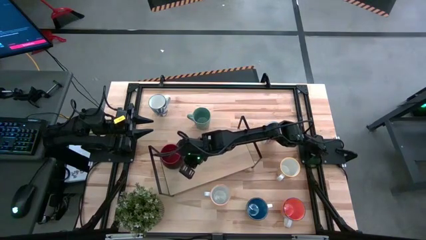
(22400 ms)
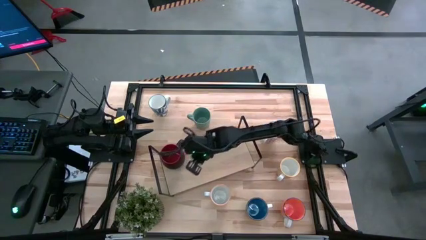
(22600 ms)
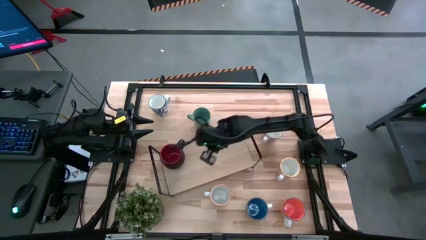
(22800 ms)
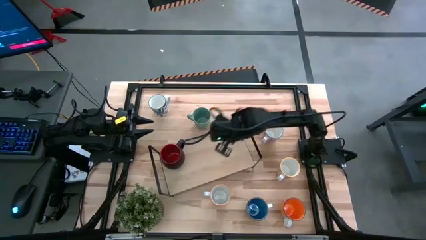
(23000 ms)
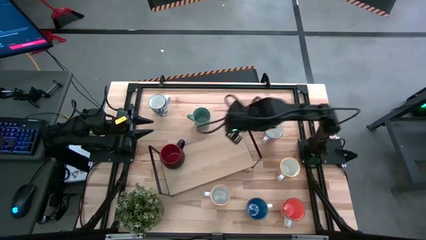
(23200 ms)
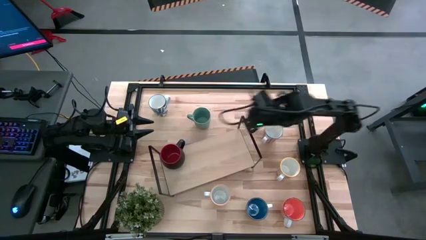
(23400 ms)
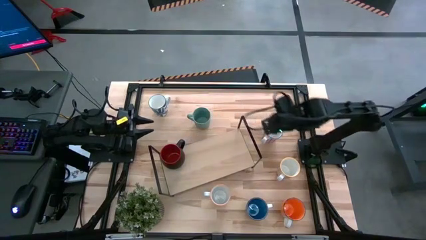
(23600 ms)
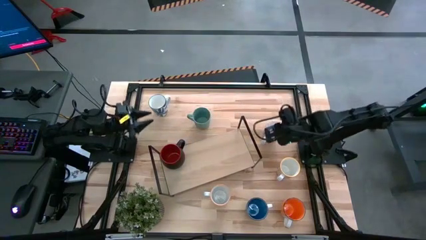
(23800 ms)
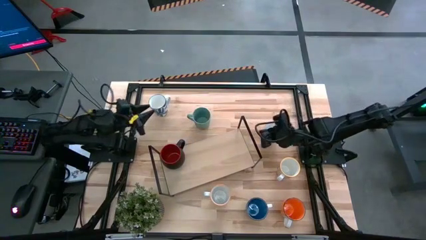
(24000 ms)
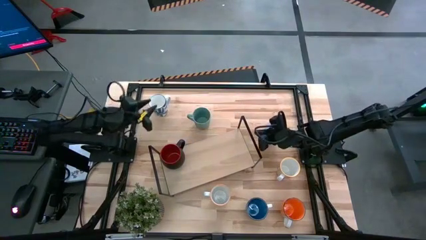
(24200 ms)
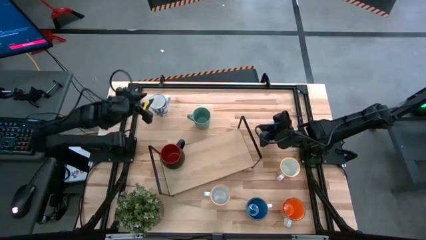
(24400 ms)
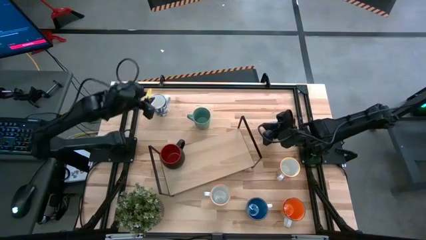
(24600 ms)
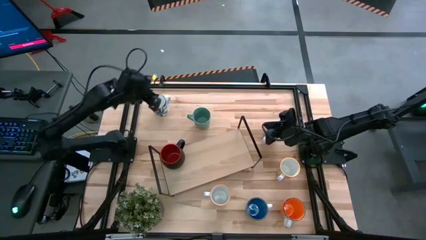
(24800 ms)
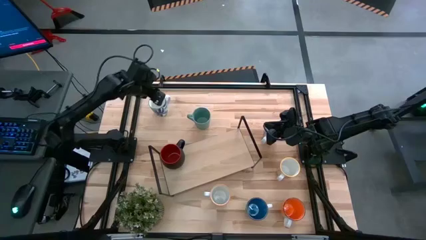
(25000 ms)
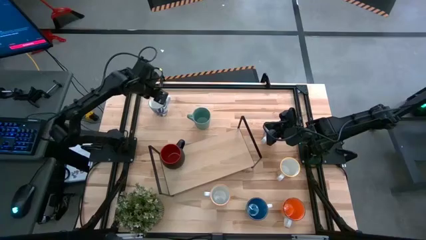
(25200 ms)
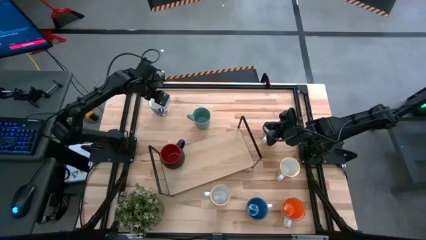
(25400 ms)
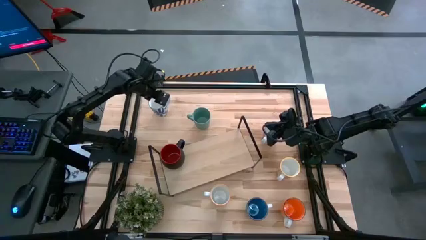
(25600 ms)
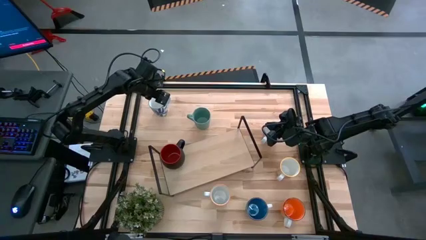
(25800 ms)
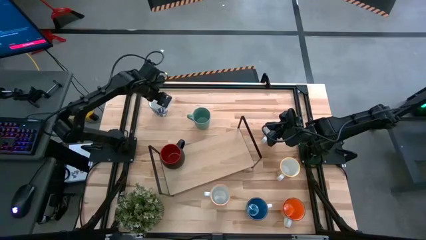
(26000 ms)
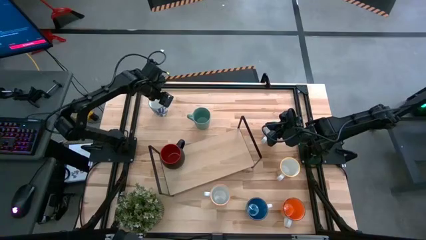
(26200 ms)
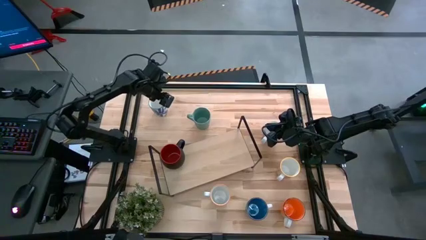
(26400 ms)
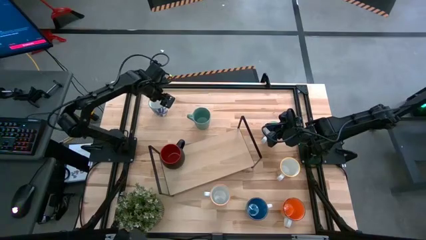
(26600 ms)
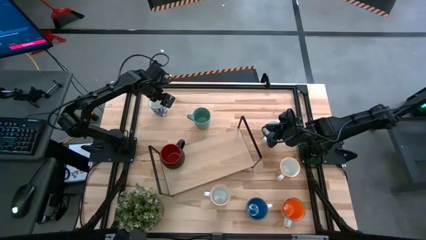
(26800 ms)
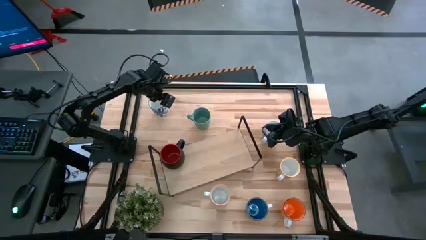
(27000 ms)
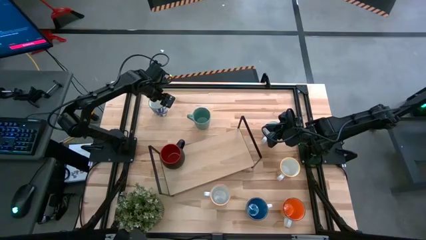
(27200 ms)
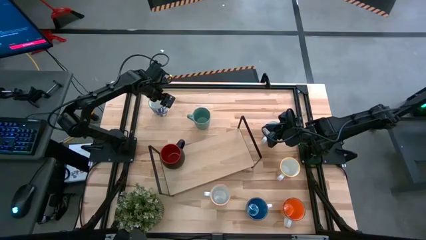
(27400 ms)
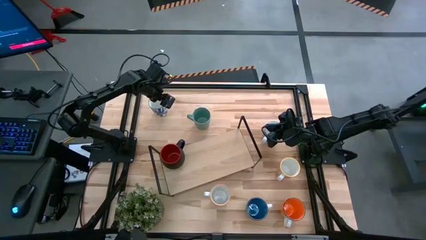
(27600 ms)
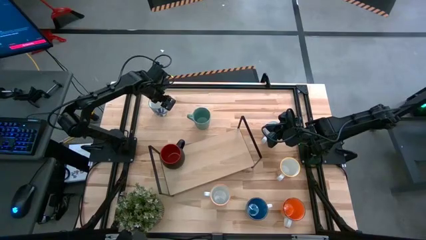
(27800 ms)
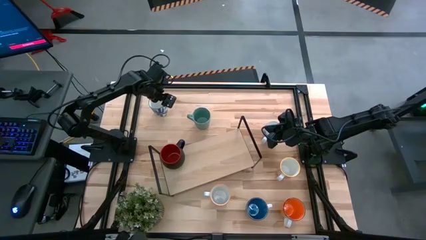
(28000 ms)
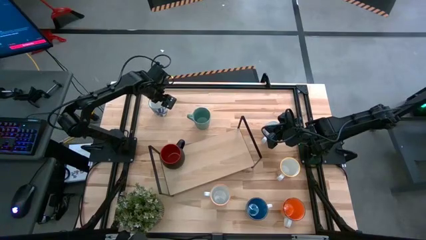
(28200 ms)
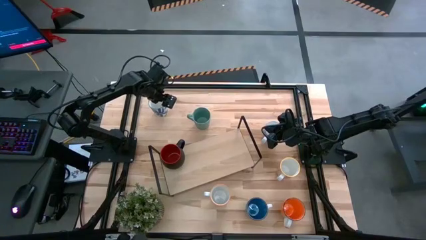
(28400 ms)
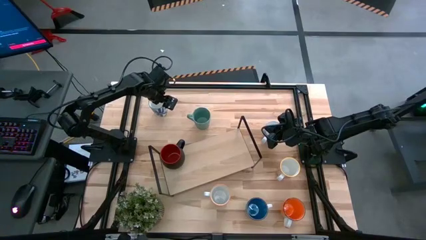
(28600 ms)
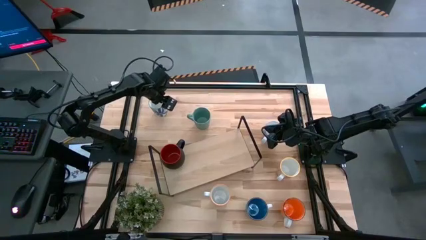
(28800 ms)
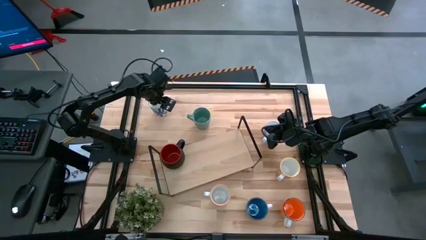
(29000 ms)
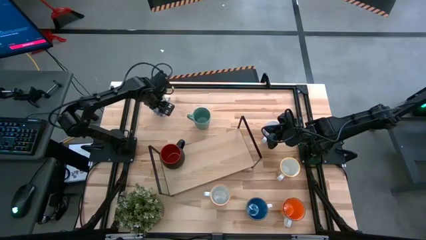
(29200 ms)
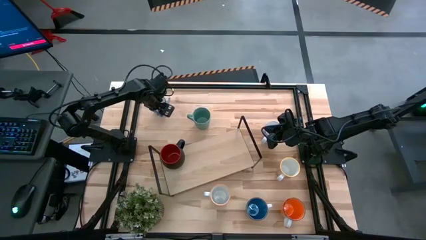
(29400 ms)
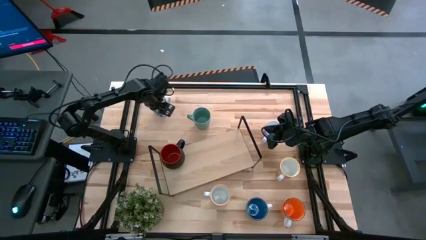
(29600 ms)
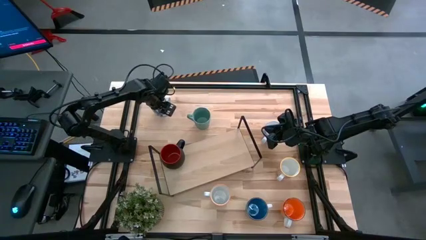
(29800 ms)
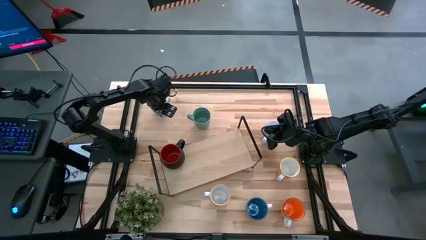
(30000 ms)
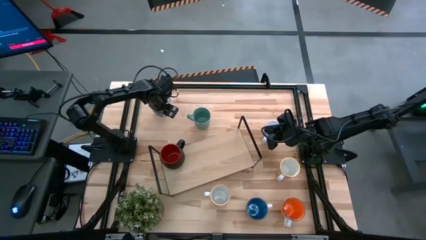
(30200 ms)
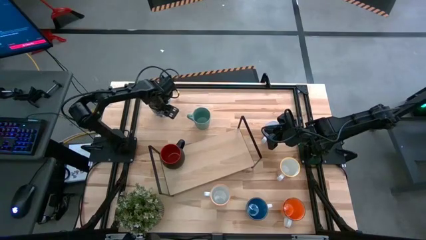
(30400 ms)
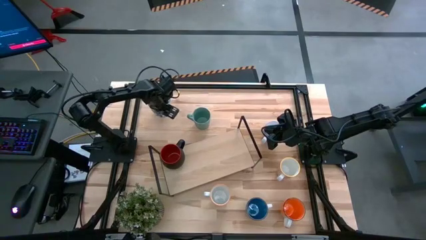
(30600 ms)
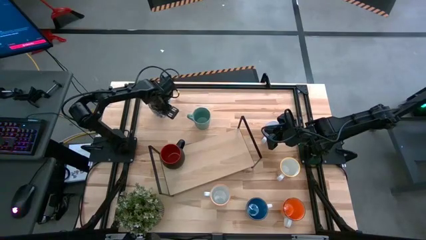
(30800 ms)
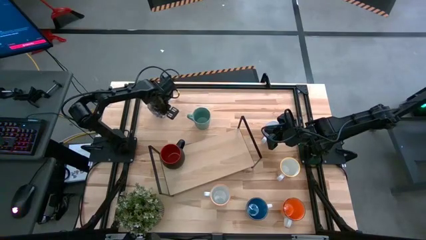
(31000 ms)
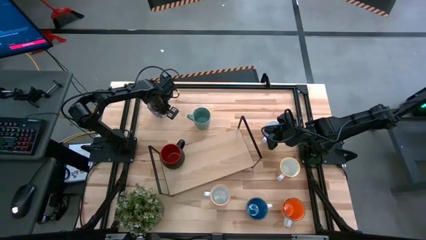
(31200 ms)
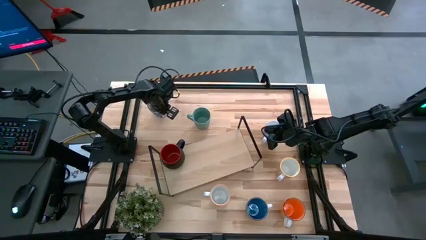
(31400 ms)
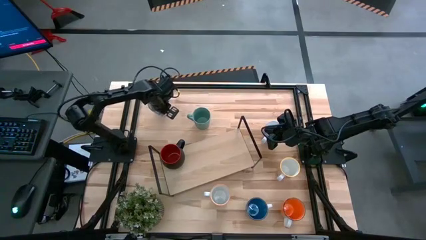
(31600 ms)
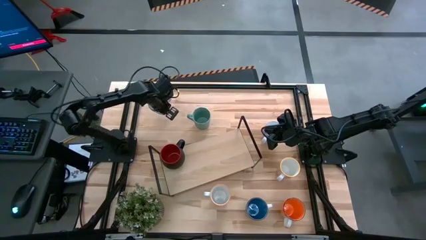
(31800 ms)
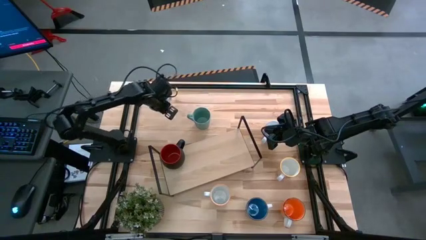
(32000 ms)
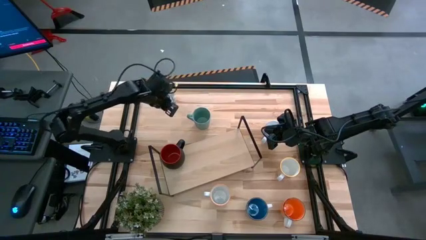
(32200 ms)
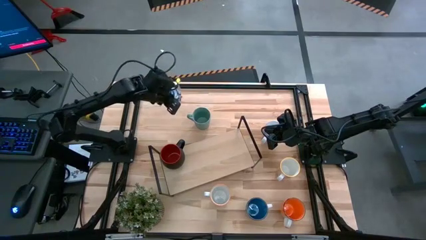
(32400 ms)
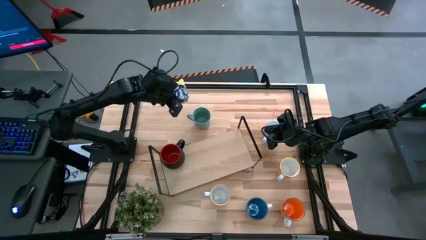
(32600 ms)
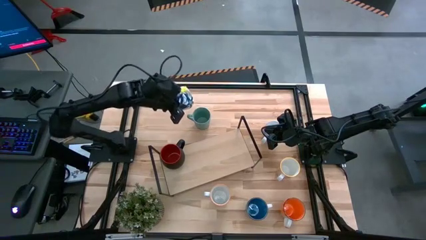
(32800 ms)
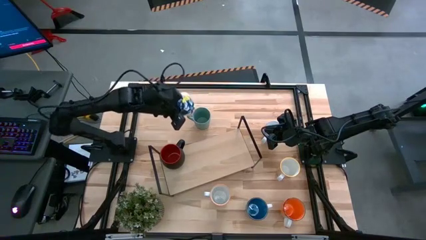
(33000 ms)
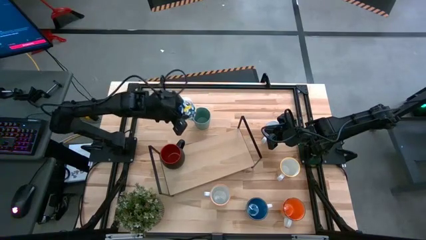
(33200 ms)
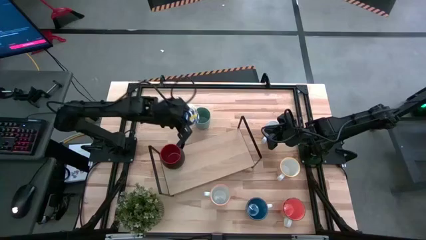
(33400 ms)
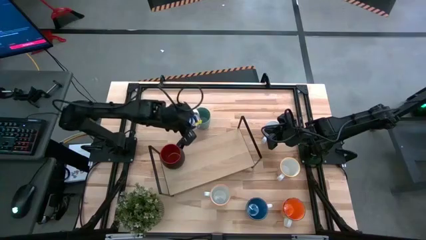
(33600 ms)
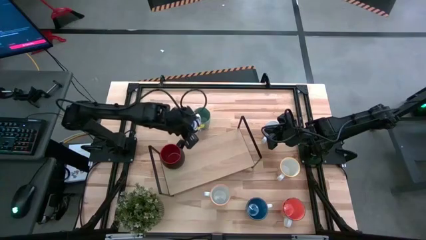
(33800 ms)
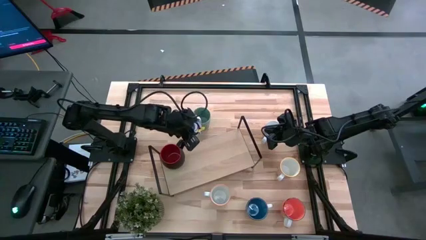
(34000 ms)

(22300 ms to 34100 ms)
Task: Place coffee mugs
Put the blue pattern mug on the shelf
